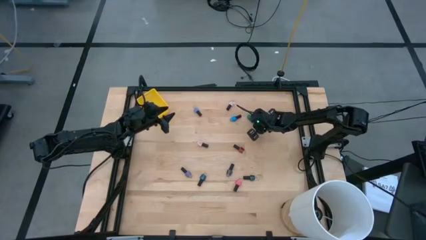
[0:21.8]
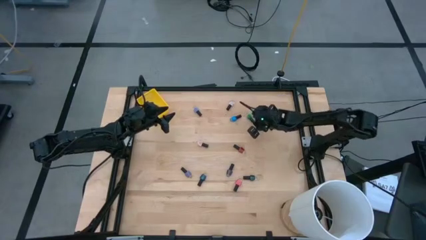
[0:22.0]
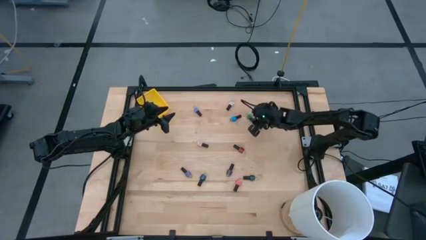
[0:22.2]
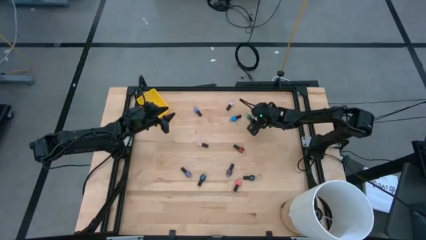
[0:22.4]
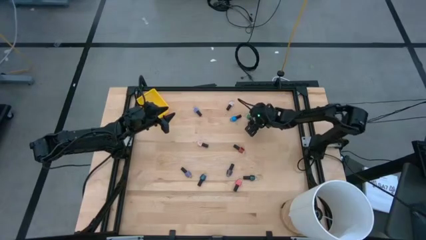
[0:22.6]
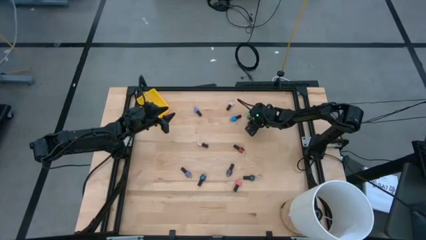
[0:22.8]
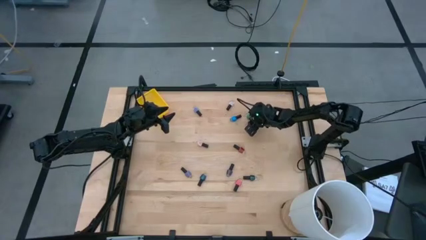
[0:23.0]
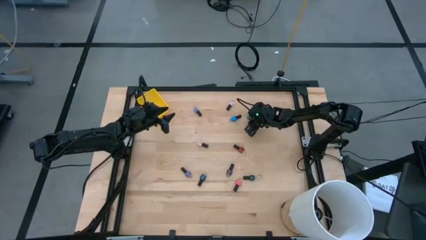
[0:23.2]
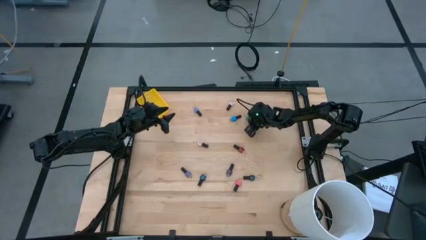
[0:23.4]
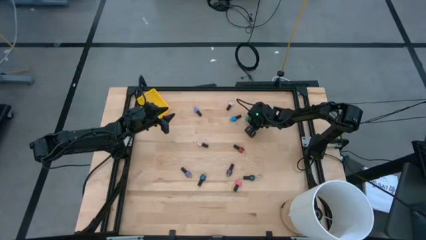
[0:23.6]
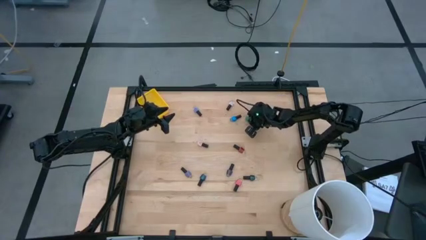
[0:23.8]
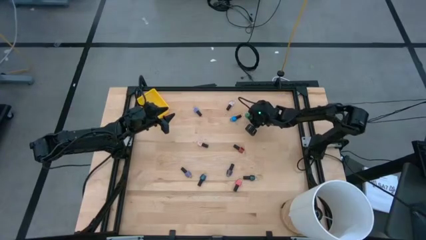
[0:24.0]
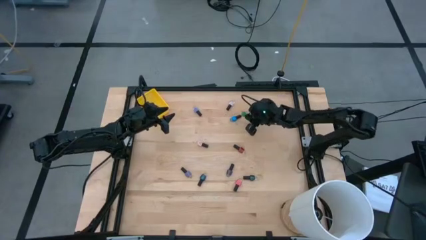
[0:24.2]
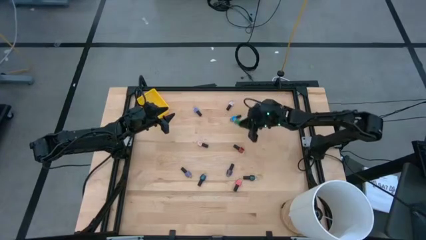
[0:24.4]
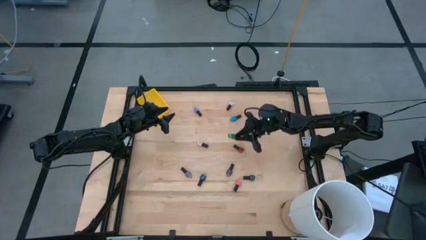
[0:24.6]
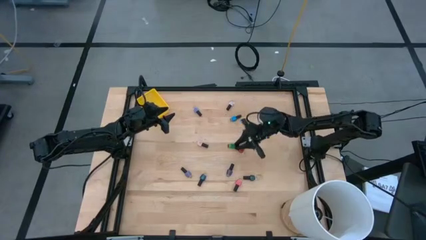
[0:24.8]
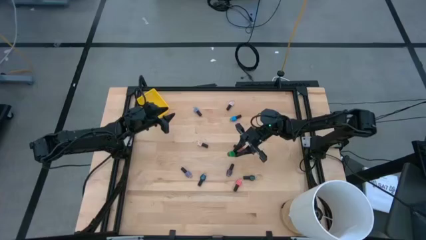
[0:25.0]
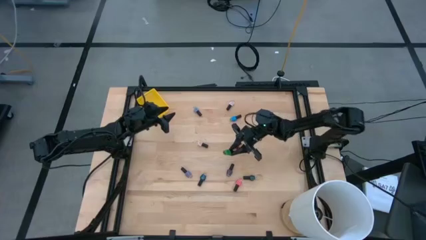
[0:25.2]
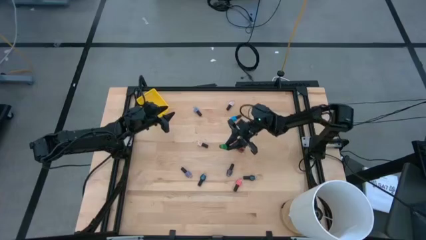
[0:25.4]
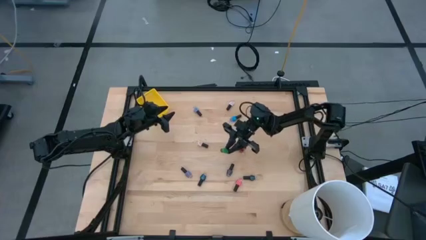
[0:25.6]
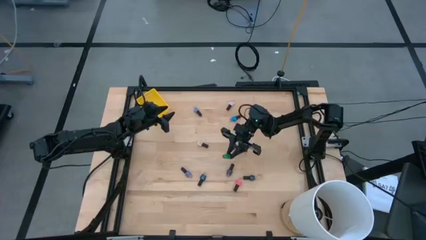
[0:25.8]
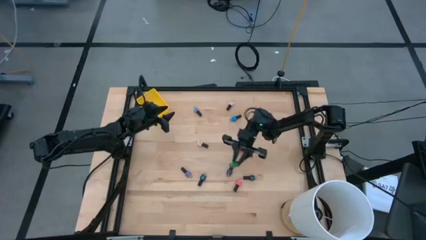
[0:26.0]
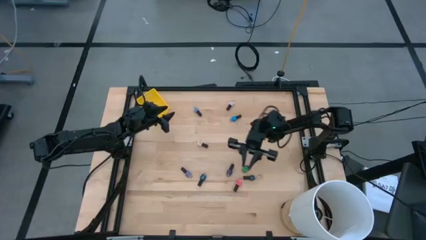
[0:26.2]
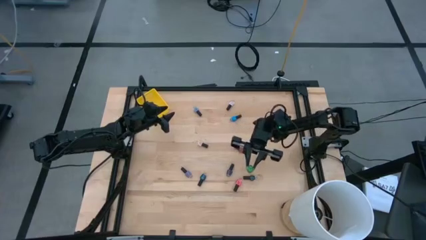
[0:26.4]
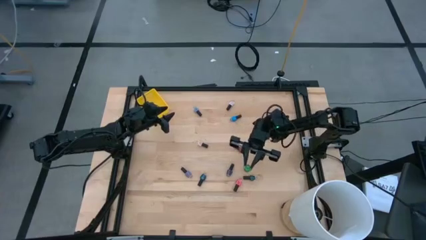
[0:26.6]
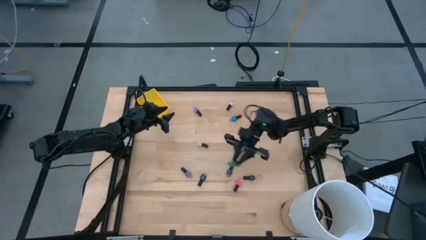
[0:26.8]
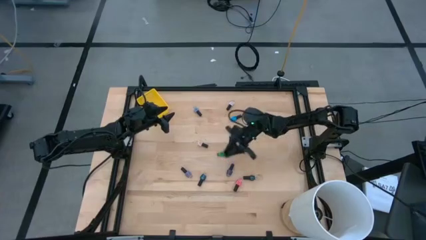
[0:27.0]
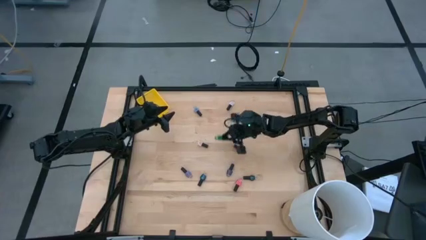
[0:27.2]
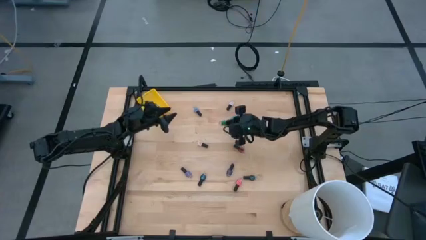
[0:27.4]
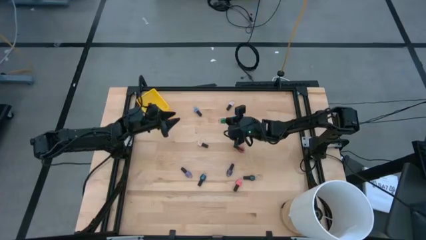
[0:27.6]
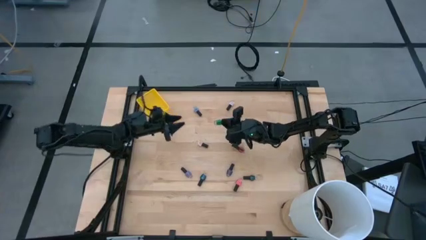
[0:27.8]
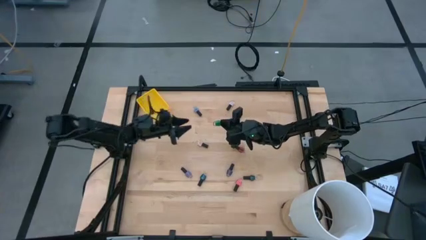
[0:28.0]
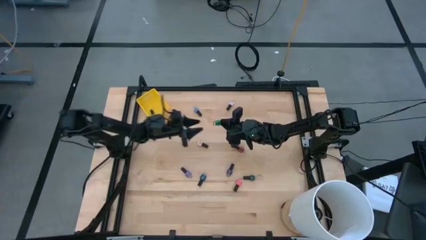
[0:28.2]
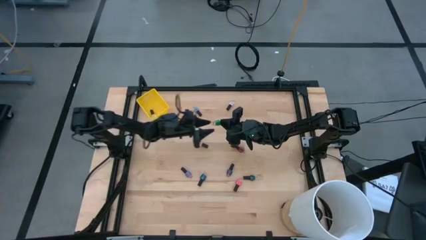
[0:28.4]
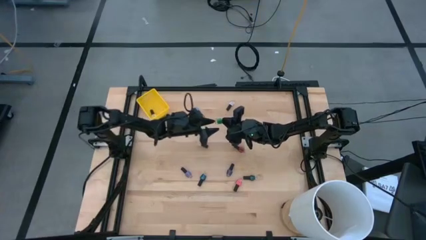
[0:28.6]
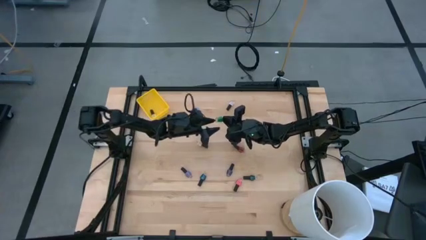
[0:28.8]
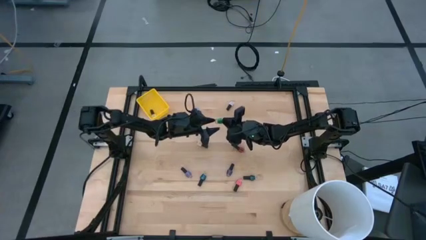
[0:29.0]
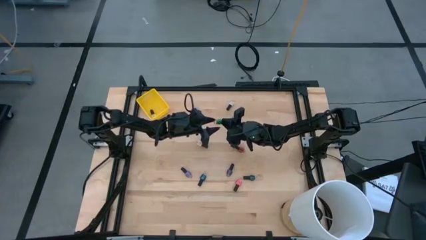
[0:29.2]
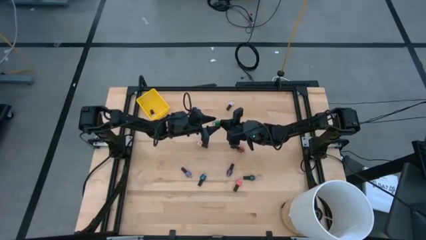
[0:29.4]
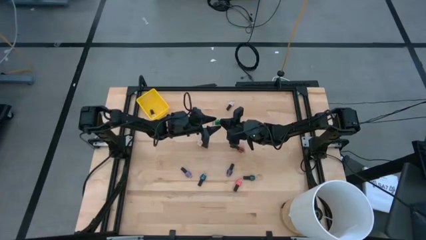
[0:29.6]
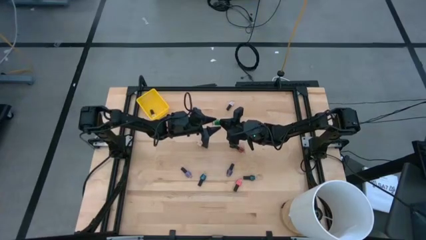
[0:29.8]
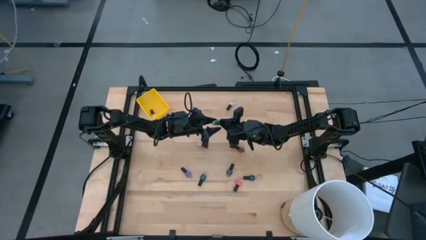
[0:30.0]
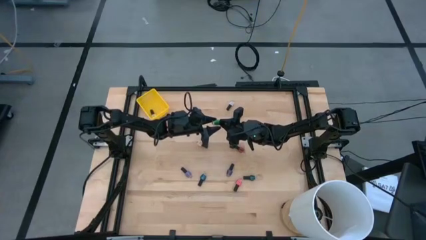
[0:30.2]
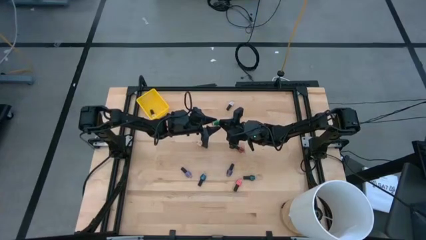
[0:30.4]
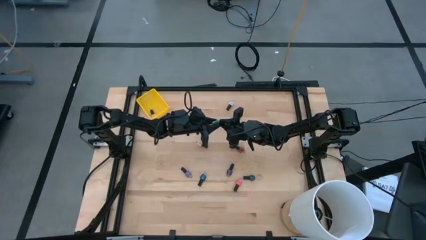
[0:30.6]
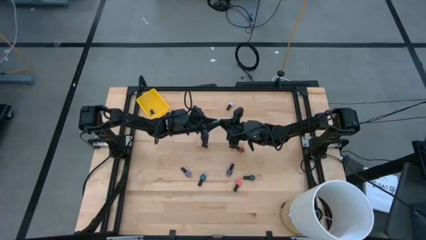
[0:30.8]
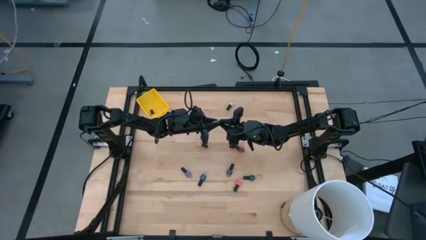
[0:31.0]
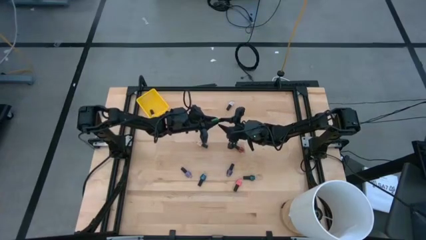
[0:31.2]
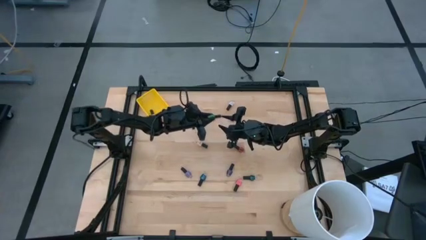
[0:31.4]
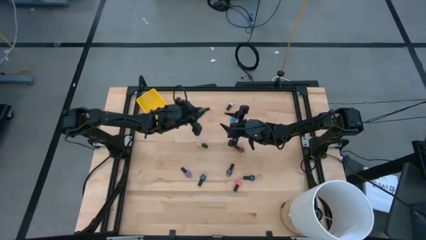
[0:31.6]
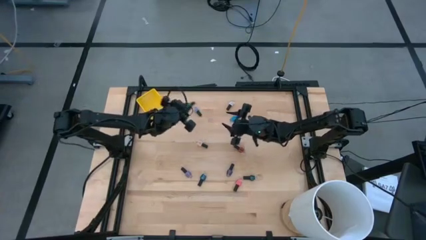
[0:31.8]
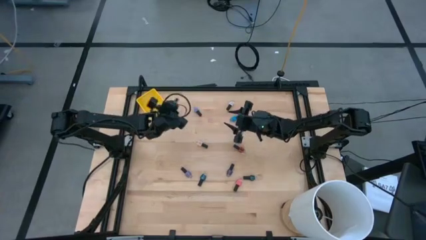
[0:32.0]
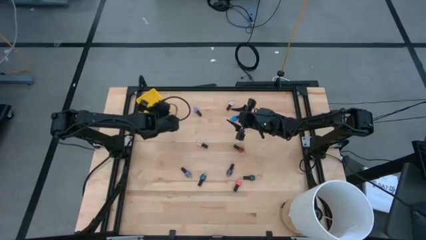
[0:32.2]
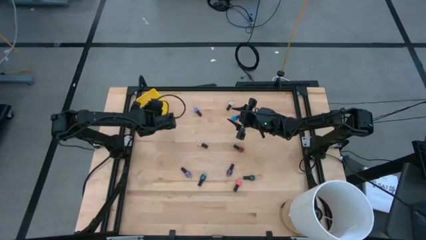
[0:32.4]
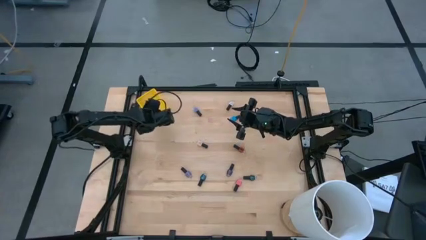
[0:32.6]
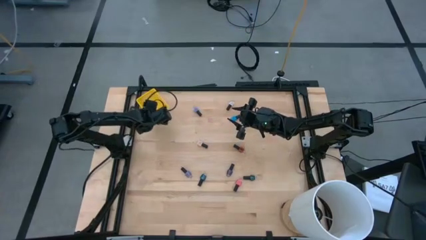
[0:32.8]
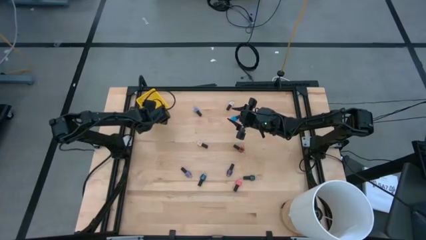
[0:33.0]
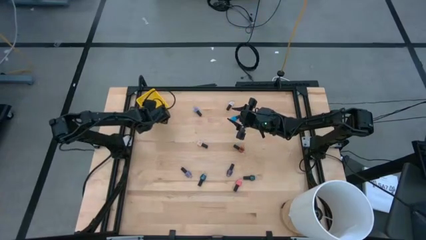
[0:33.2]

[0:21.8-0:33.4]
Task: Pick & Place Nail Polish
Put the green nail polish into the yellow bin
